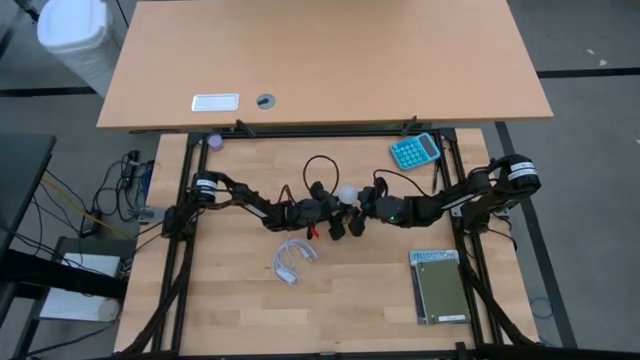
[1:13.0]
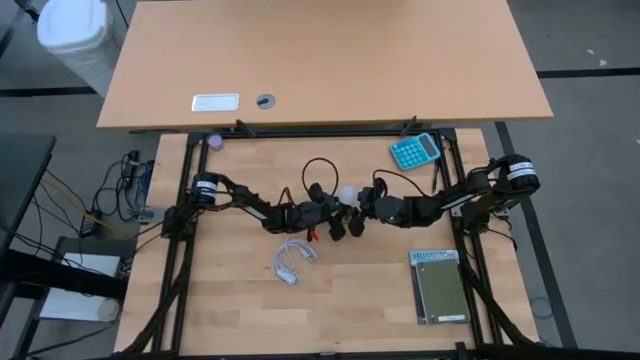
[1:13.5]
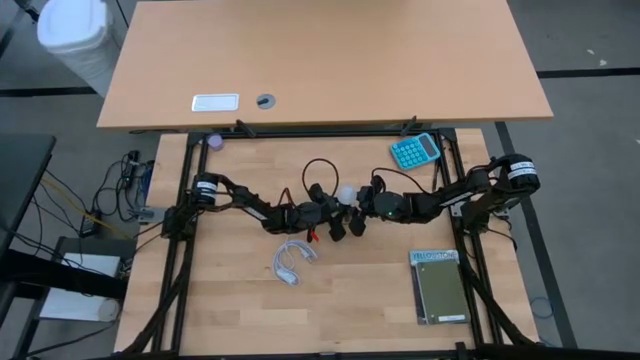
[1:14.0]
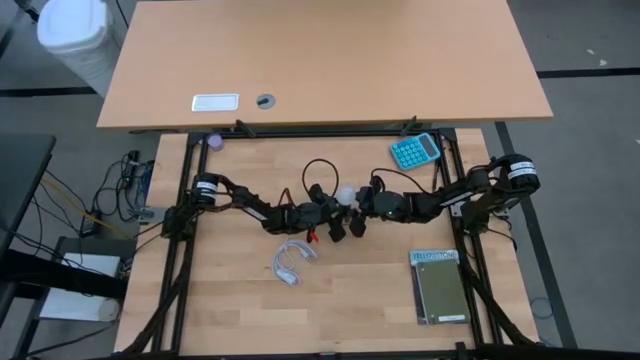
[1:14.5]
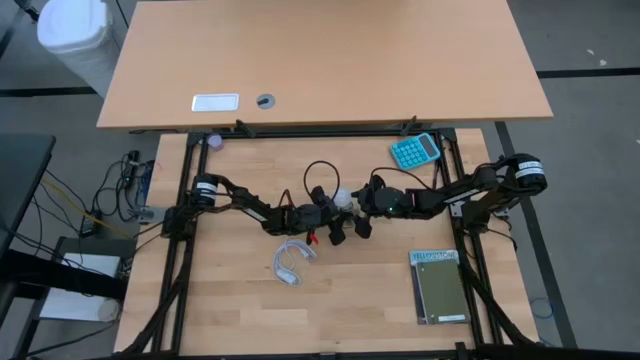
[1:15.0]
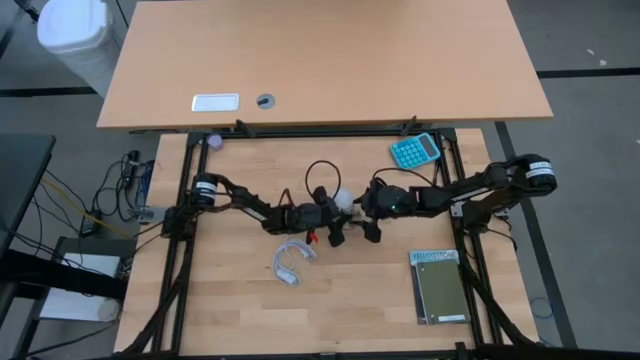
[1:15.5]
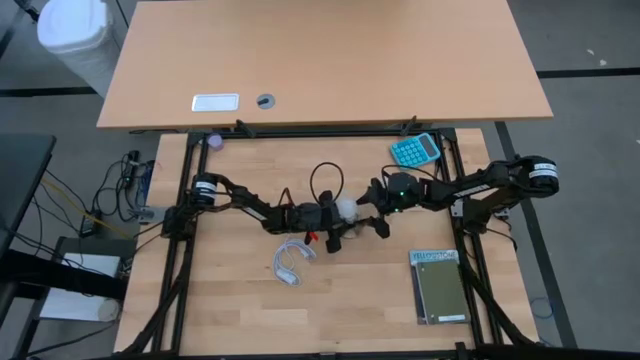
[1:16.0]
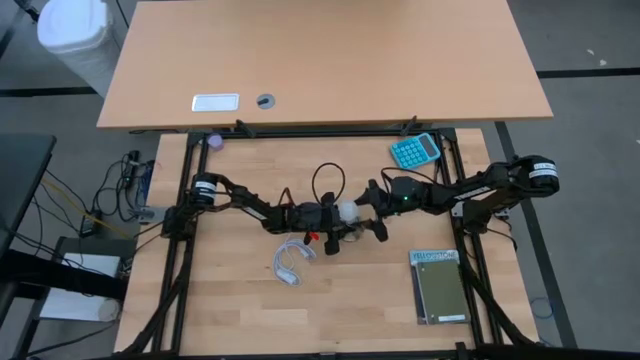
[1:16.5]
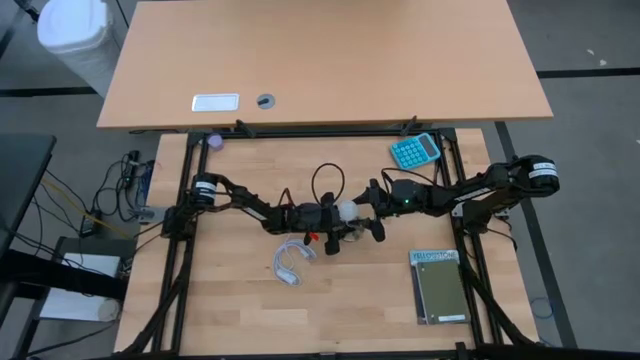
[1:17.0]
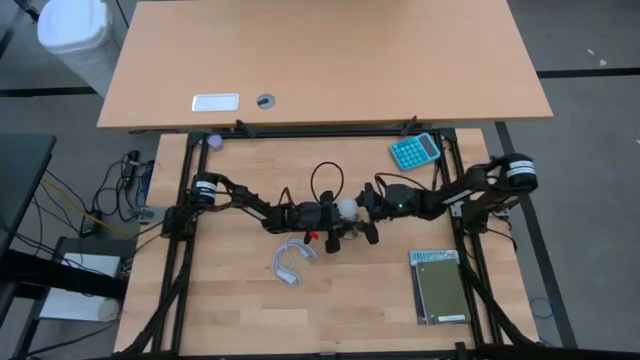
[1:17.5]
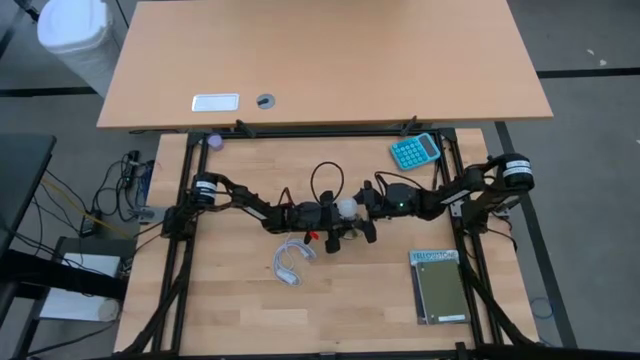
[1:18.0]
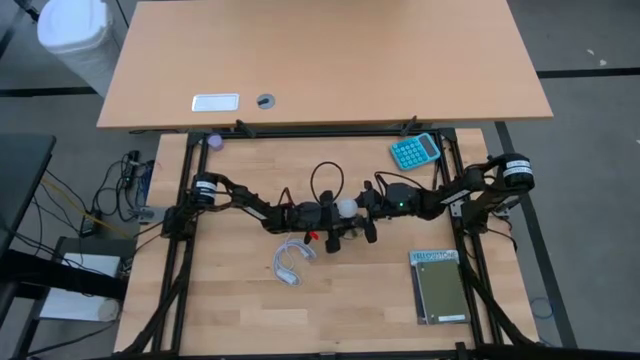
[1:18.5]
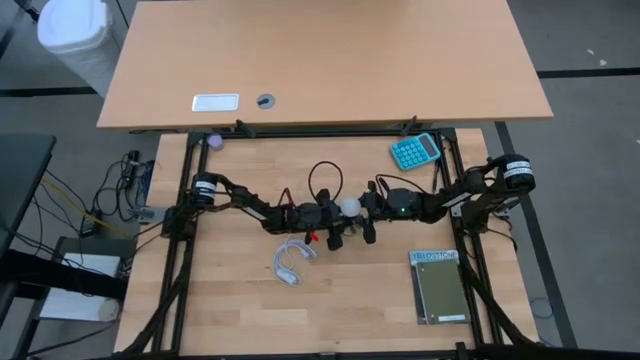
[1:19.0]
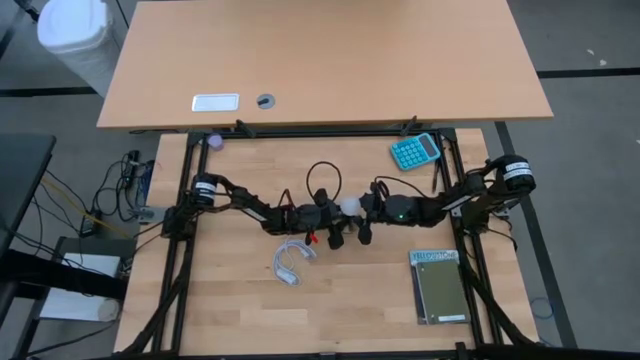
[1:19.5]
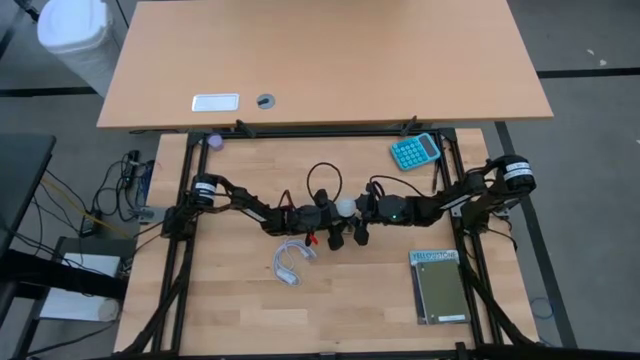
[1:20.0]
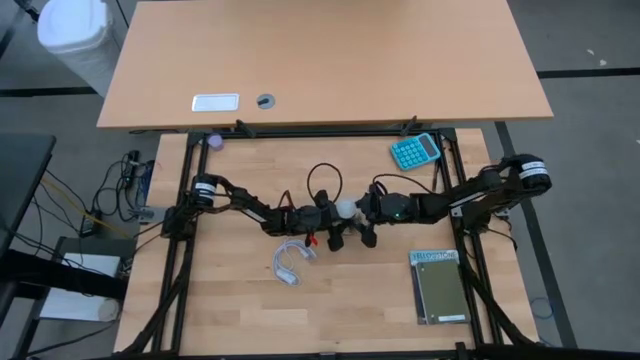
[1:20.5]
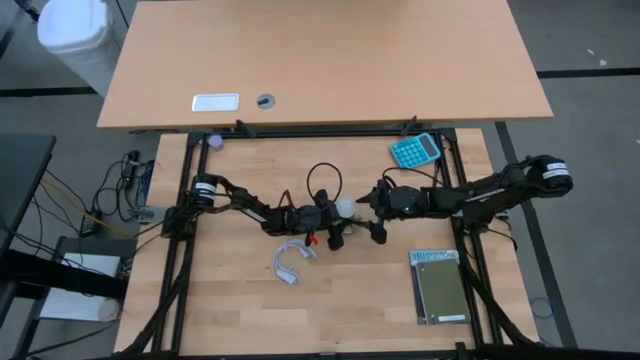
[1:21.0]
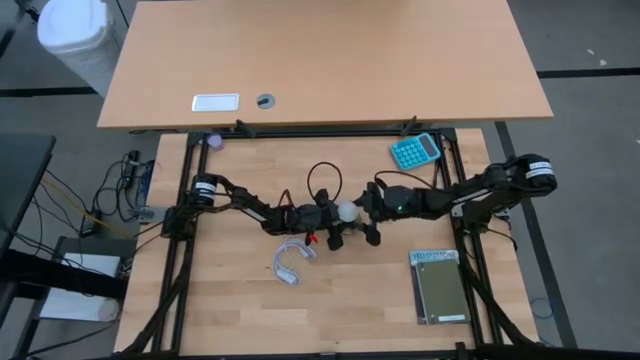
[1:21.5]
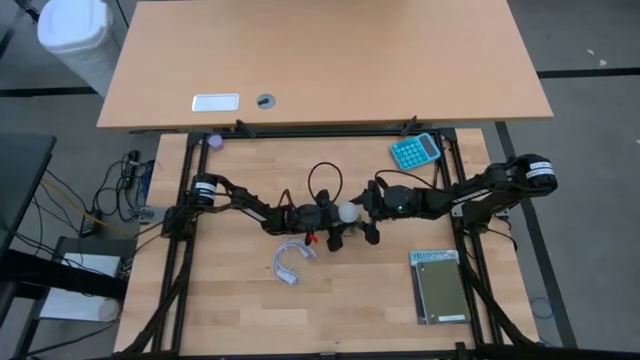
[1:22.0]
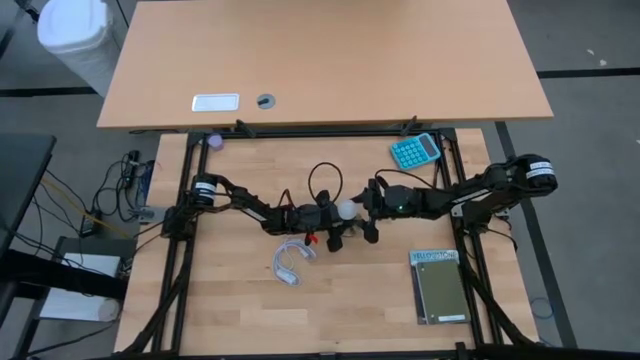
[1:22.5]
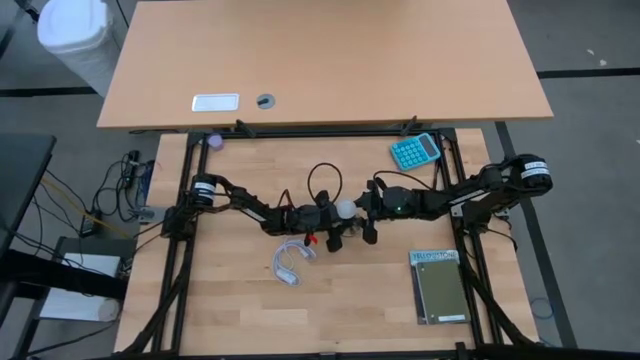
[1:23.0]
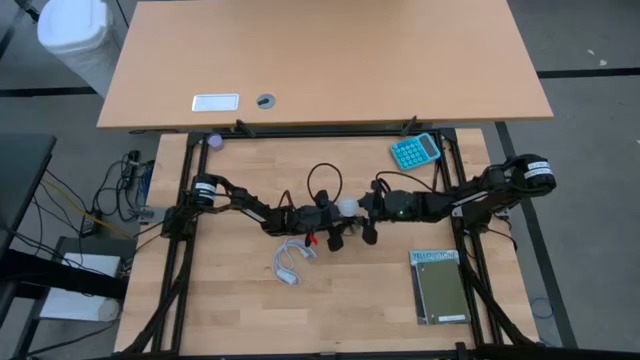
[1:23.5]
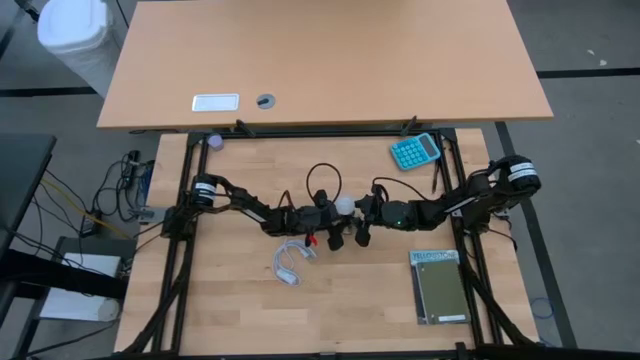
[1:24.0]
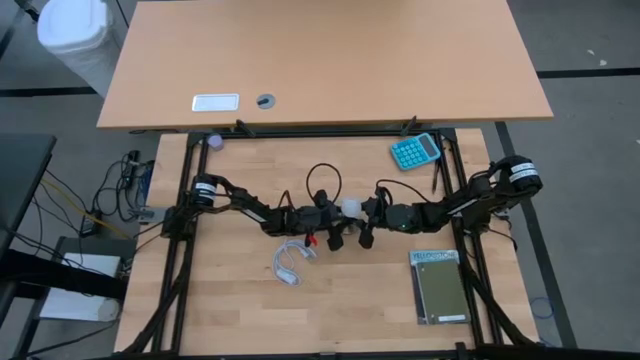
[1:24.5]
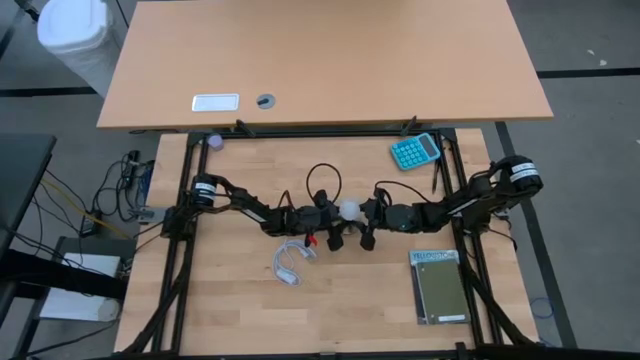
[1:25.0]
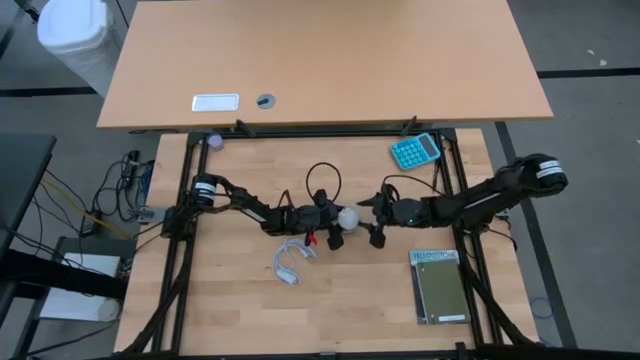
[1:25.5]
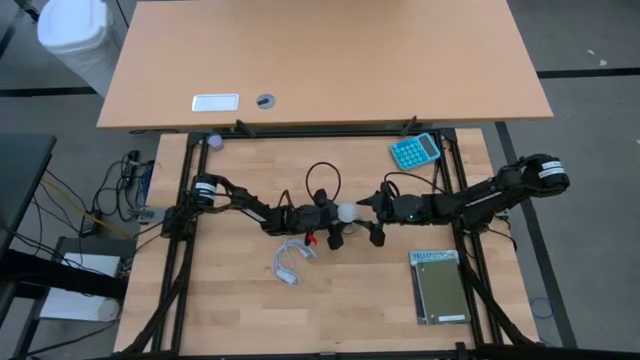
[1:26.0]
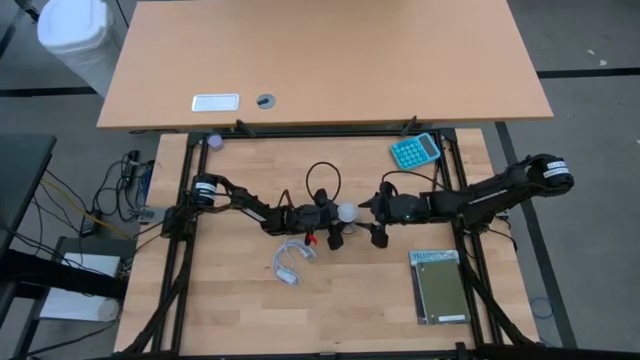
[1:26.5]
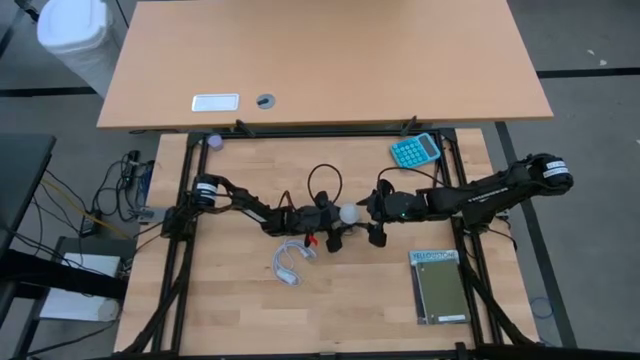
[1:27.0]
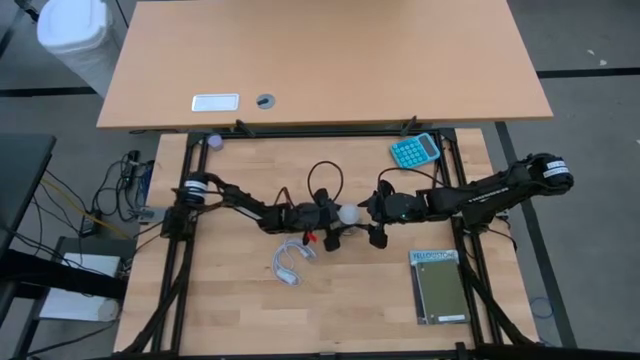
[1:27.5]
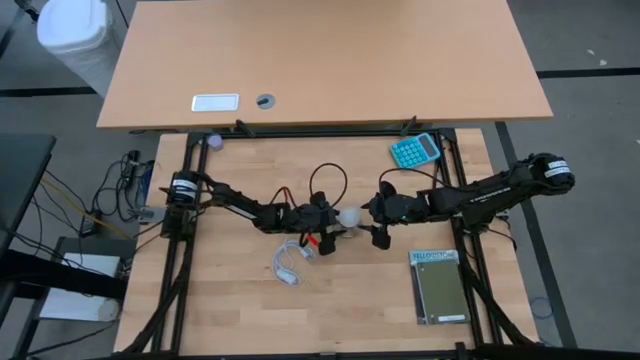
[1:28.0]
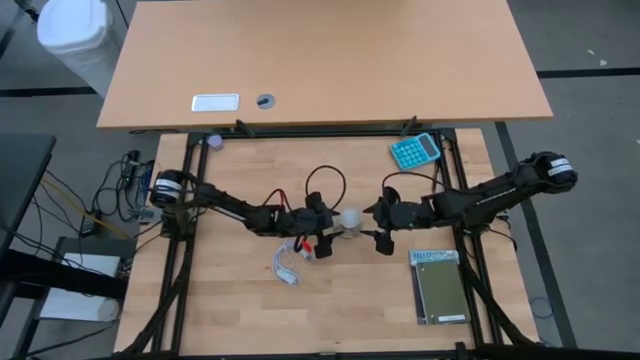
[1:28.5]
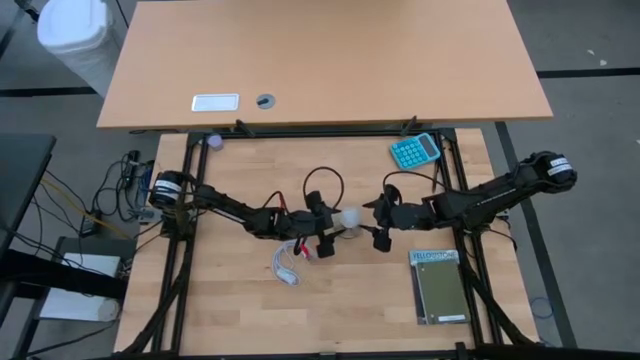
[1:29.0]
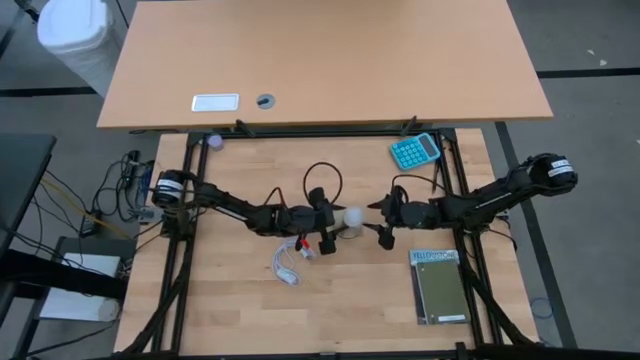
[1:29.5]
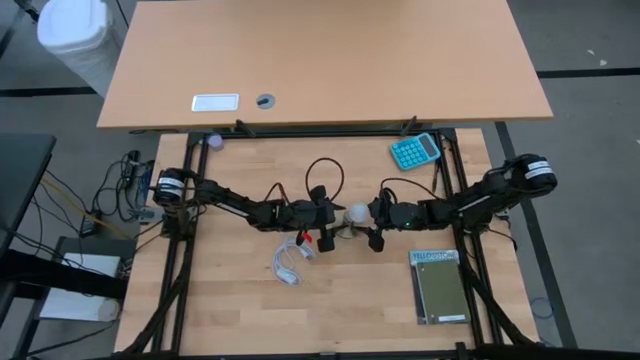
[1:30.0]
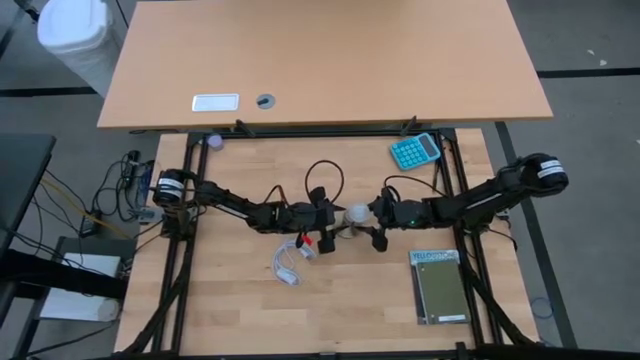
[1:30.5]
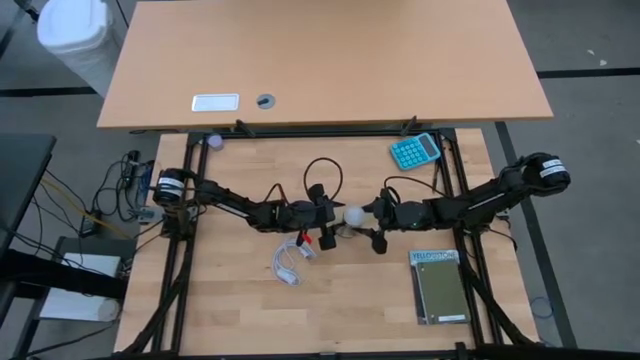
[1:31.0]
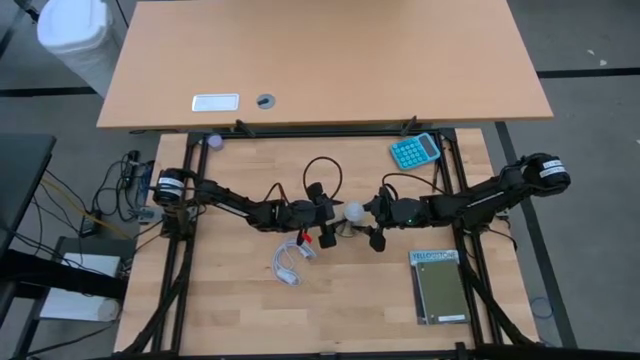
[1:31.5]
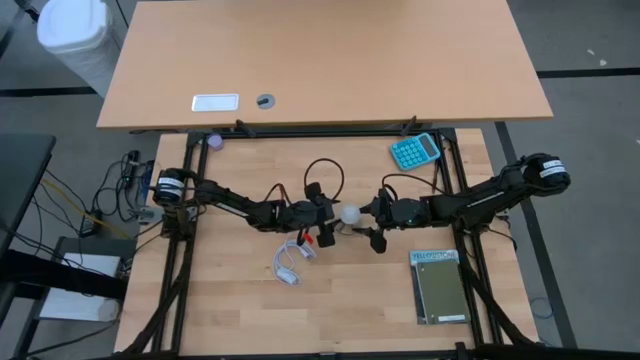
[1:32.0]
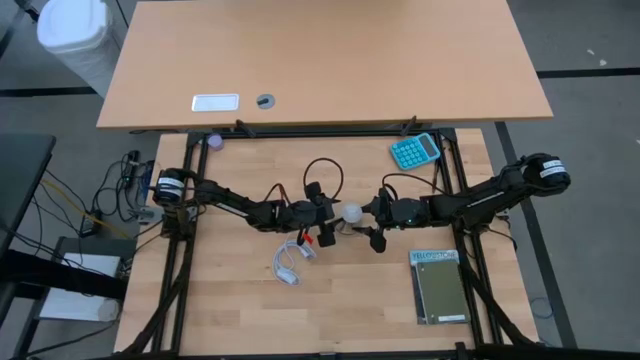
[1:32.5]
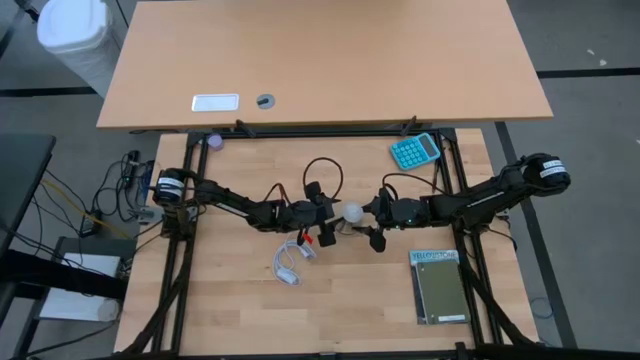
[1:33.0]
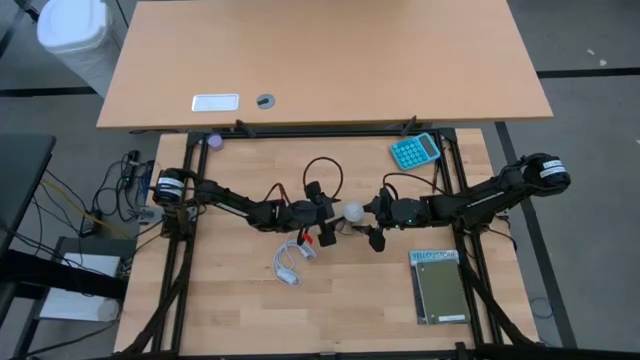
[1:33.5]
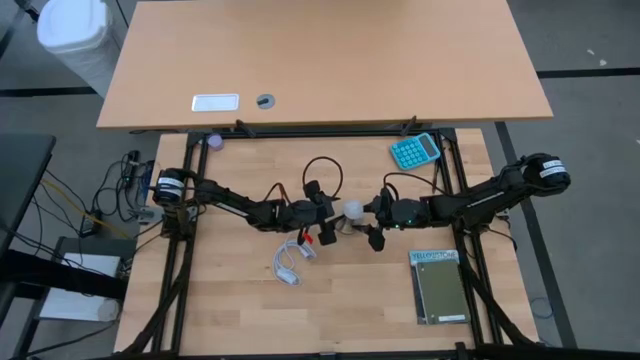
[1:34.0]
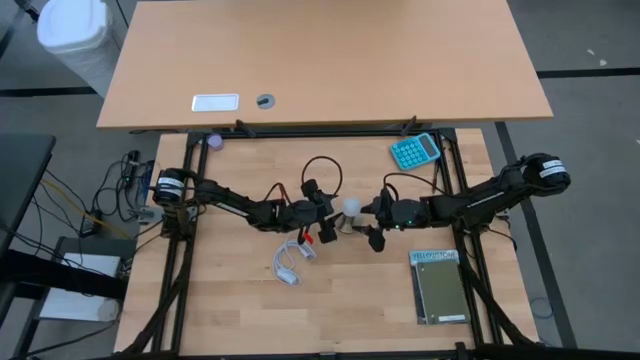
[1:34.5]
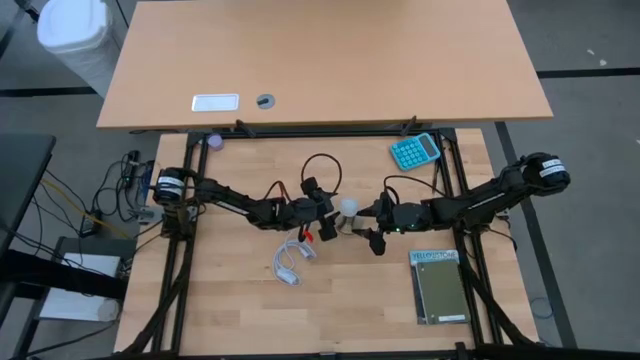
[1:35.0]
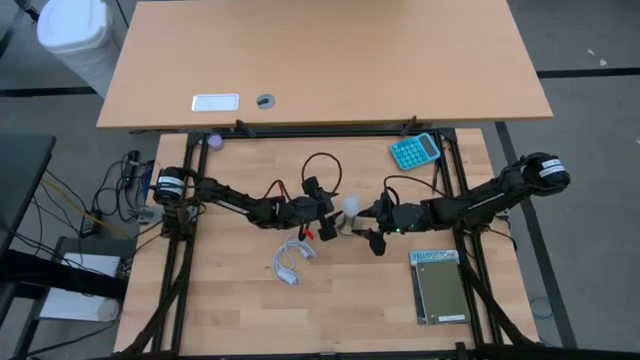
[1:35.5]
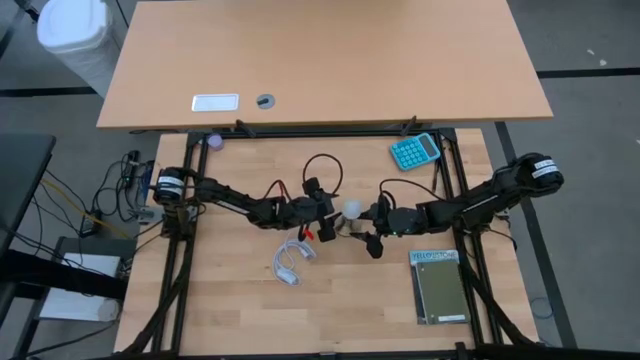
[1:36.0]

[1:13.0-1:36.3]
Task: Screw lightbulb
Insert the lightbulb into the socket
